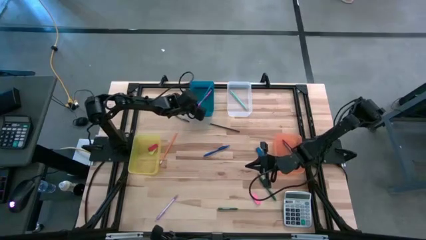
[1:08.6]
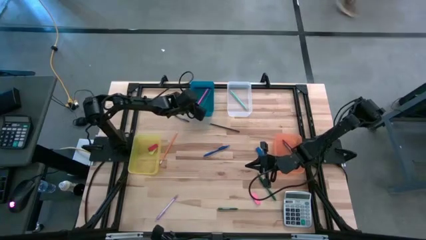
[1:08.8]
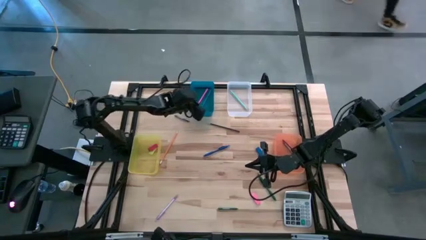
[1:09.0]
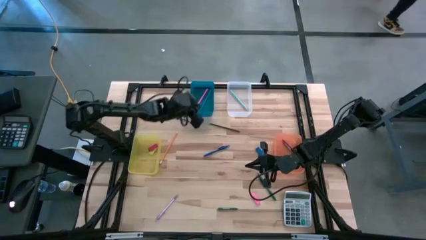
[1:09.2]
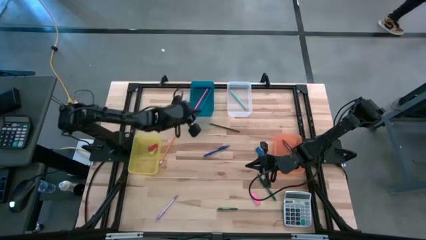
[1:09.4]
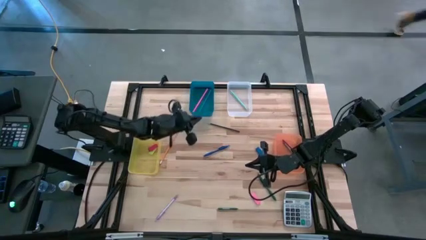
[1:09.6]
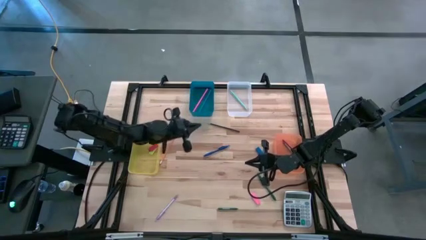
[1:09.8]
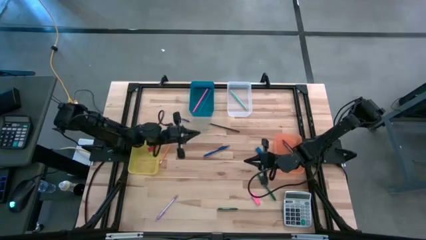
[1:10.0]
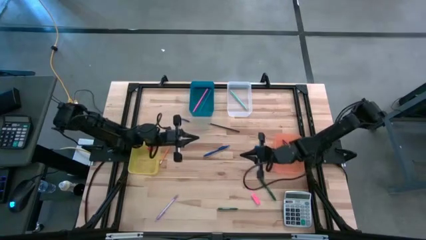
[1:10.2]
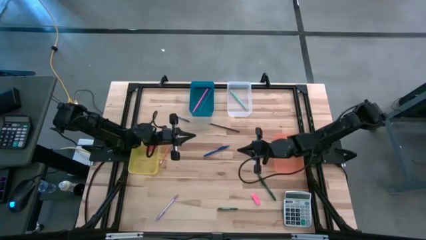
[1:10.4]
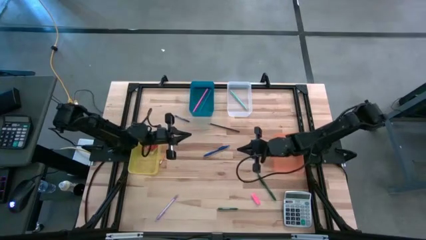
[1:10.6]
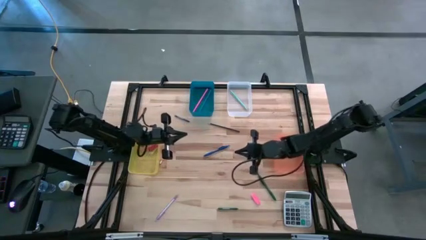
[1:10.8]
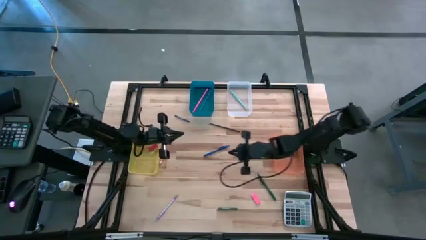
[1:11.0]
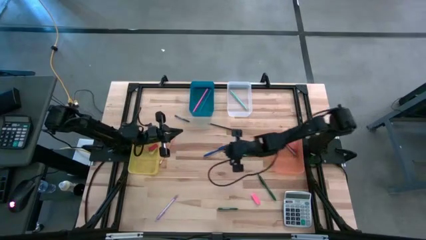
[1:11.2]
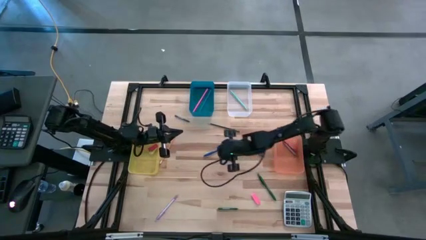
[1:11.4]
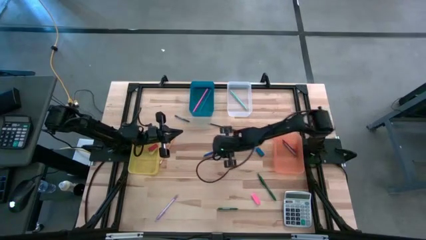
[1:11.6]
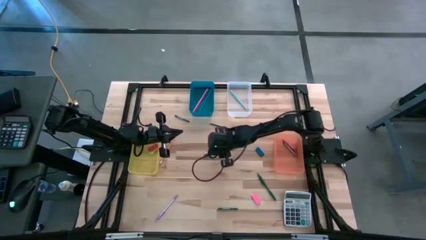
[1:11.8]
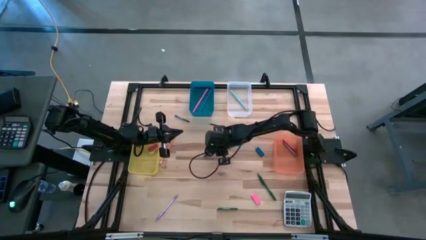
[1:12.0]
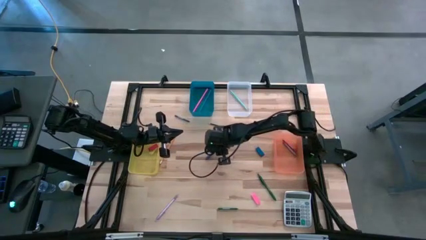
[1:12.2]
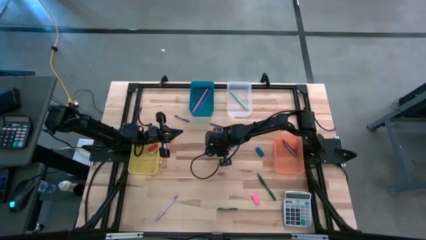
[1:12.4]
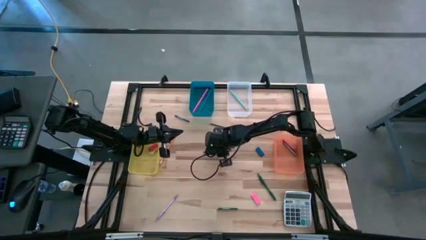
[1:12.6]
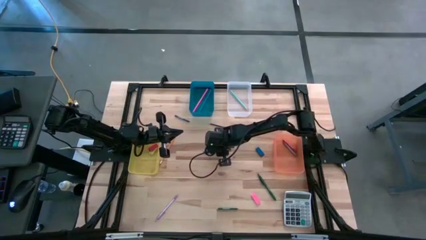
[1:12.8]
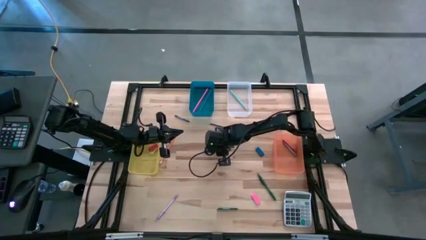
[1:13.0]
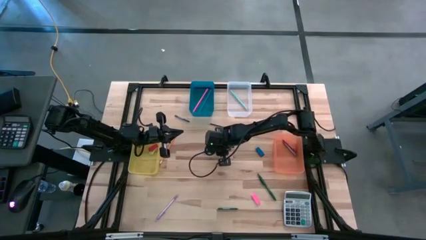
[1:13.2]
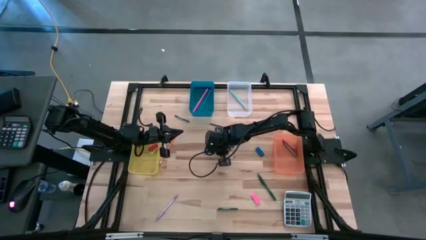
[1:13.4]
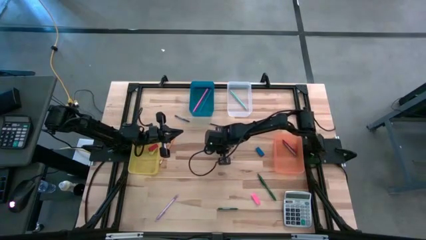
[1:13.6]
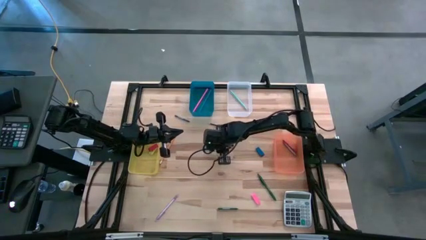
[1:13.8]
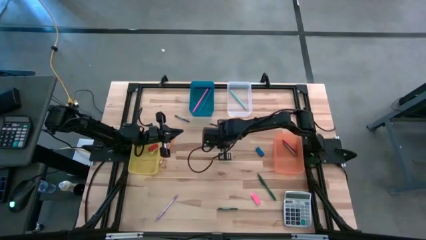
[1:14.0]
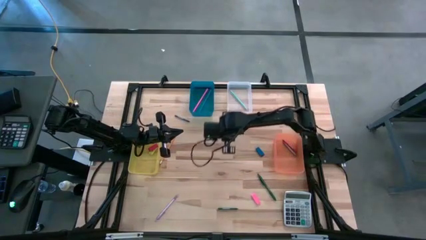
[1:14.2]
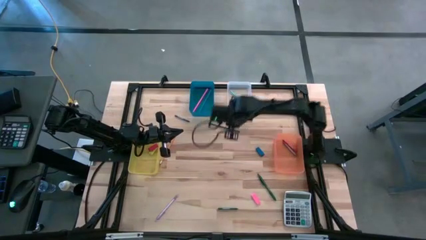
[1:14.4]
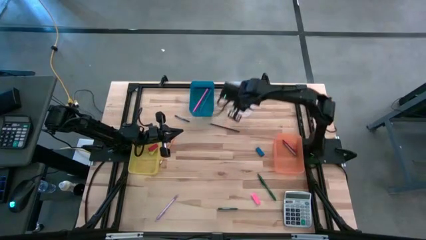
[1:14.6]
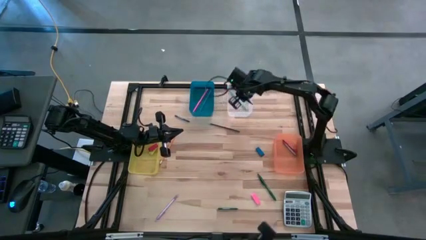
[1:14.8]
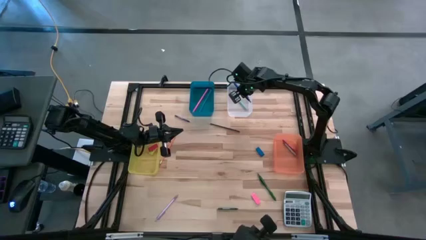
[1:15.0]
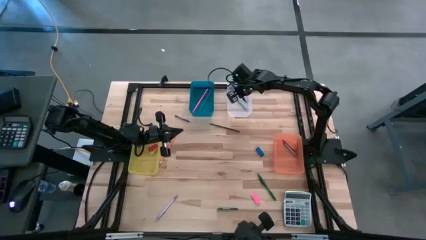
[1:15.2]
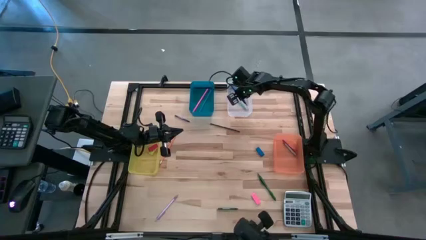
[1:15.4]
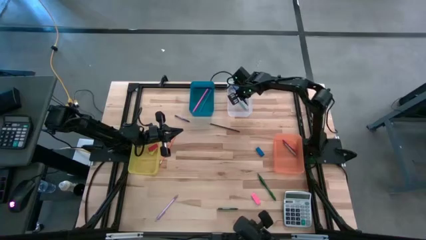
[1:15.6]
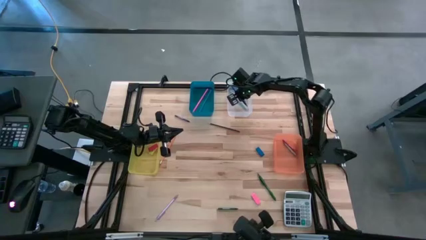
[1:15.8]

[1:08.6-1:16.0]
Task: Sort crayons/erasers/pens/pencils in bins
Put the blue ballpen into the white bin

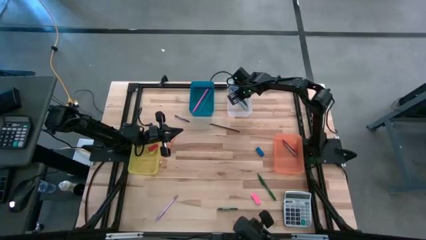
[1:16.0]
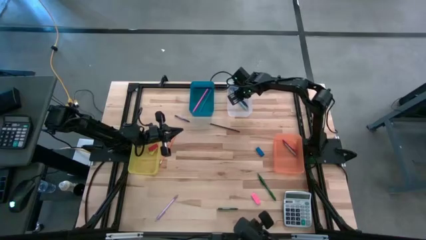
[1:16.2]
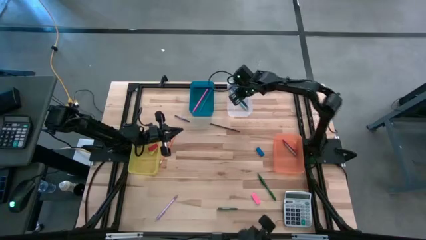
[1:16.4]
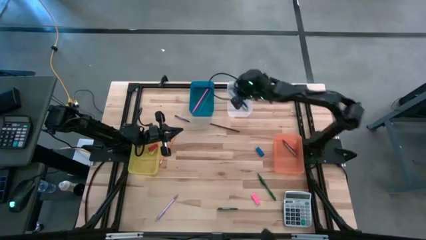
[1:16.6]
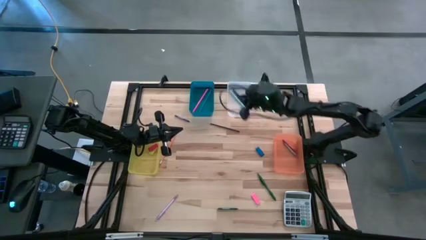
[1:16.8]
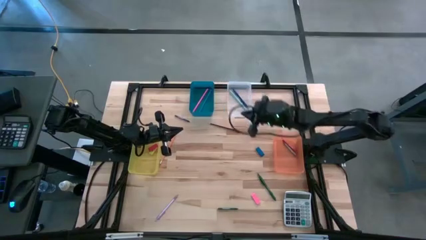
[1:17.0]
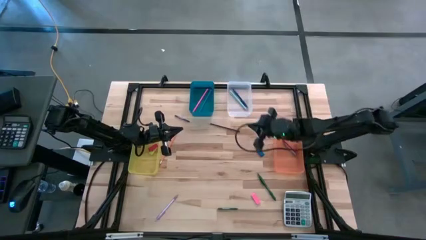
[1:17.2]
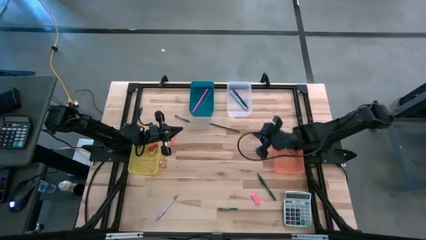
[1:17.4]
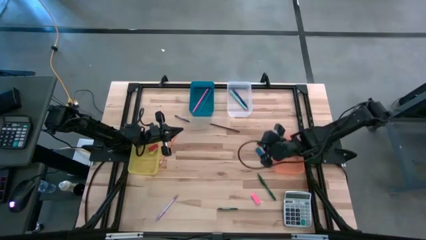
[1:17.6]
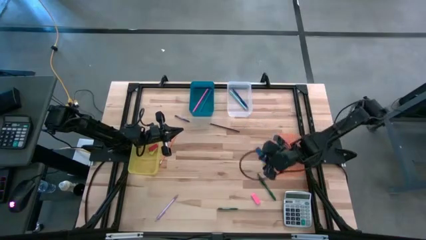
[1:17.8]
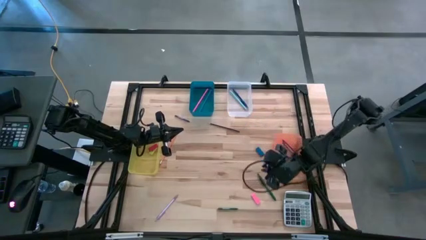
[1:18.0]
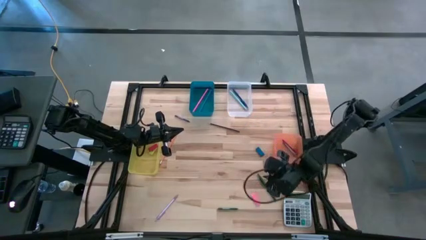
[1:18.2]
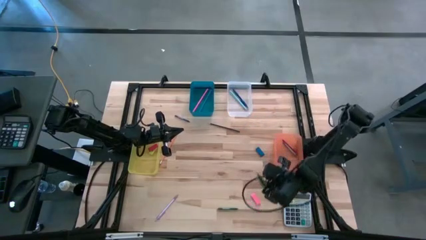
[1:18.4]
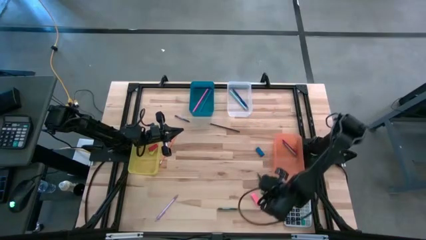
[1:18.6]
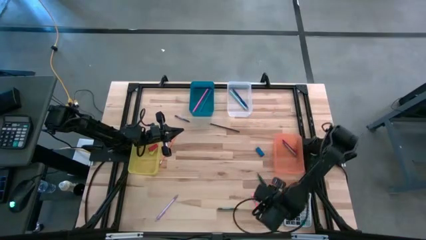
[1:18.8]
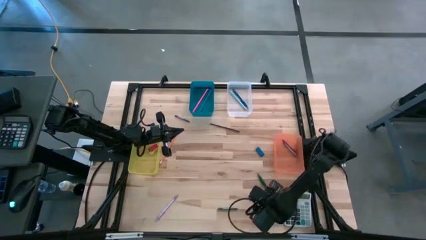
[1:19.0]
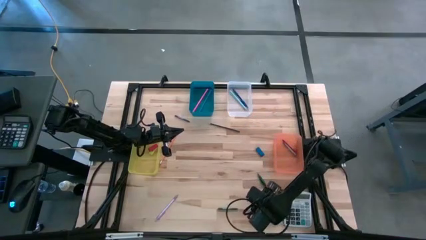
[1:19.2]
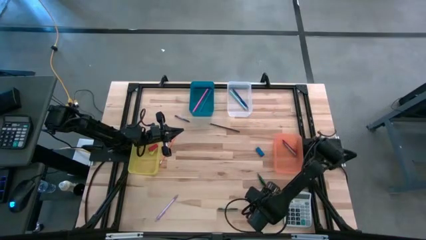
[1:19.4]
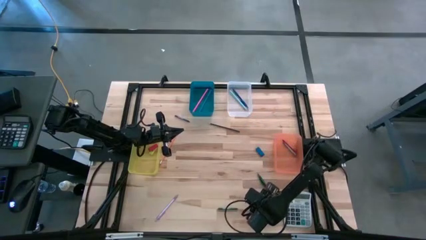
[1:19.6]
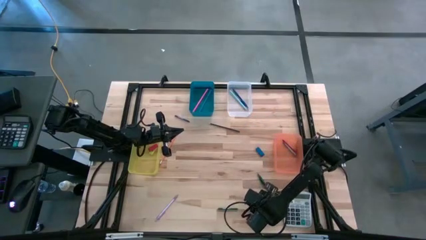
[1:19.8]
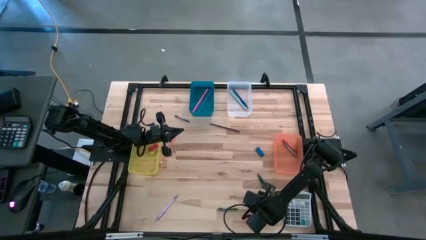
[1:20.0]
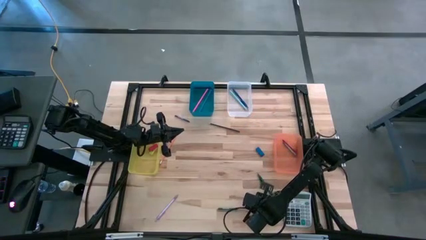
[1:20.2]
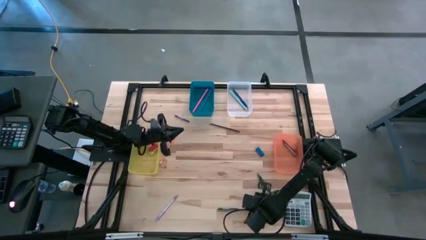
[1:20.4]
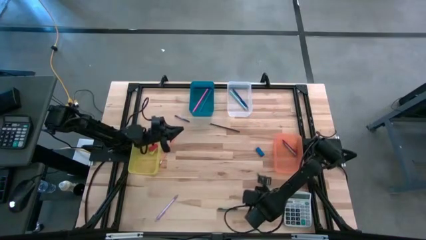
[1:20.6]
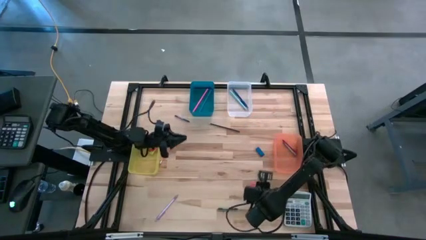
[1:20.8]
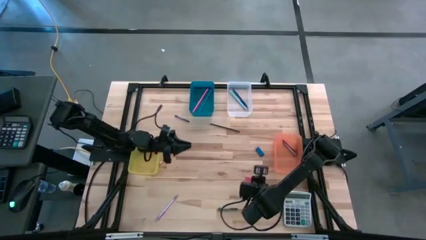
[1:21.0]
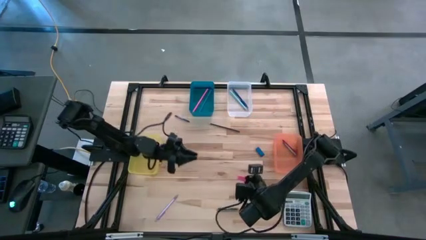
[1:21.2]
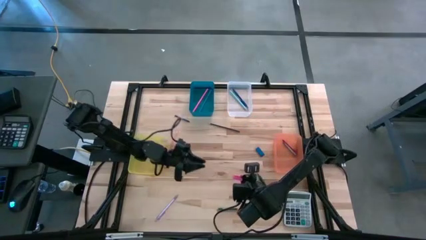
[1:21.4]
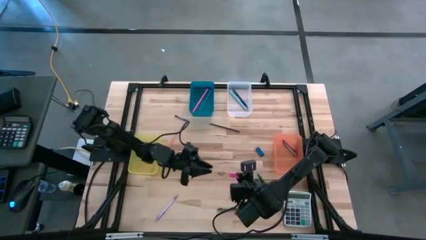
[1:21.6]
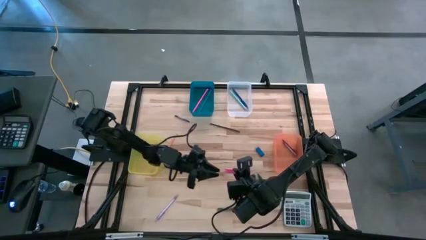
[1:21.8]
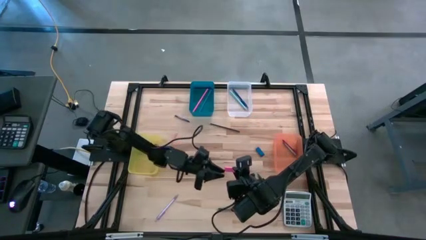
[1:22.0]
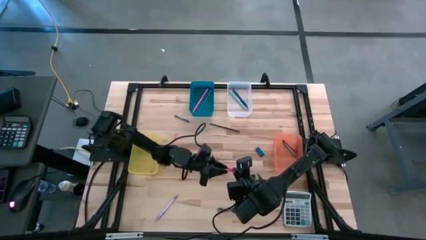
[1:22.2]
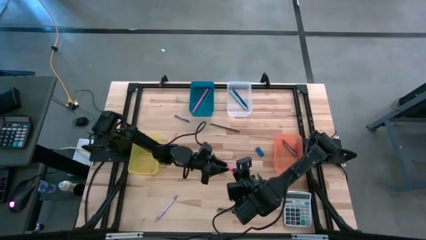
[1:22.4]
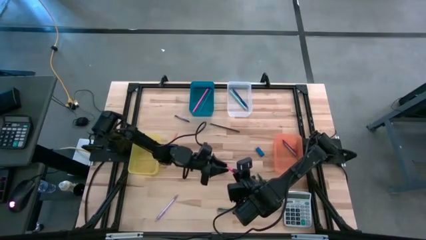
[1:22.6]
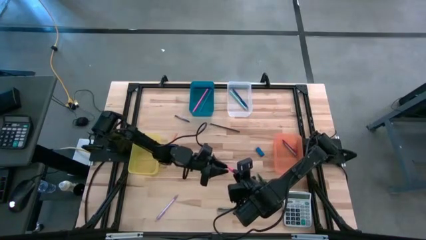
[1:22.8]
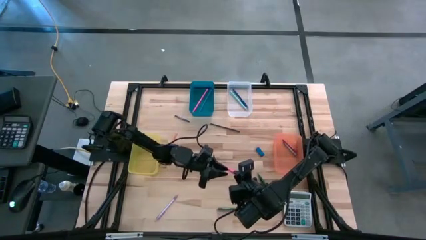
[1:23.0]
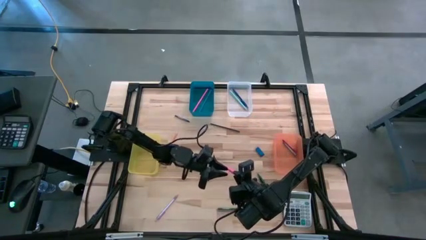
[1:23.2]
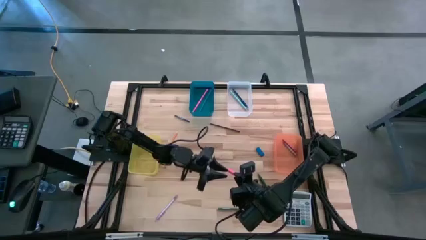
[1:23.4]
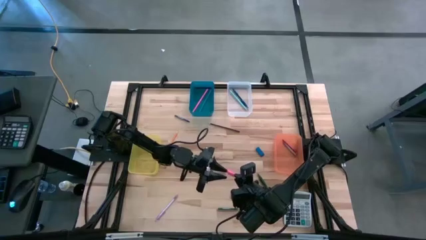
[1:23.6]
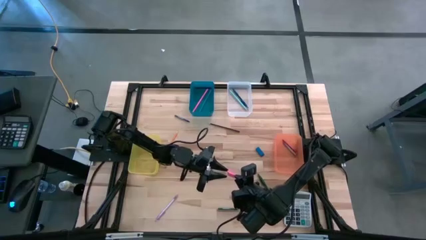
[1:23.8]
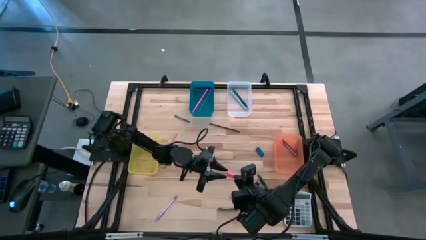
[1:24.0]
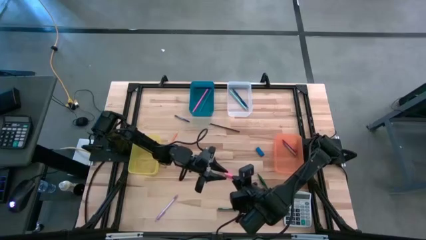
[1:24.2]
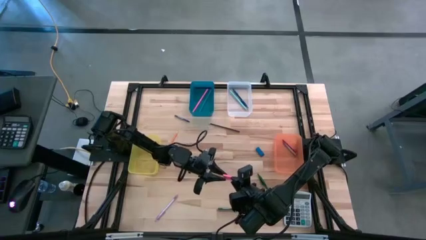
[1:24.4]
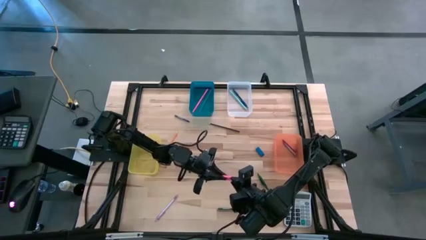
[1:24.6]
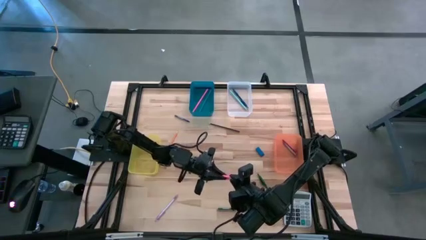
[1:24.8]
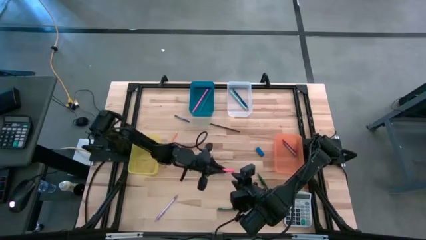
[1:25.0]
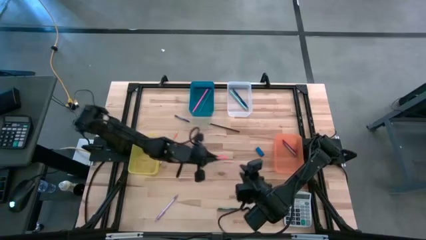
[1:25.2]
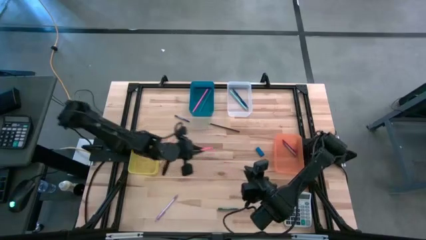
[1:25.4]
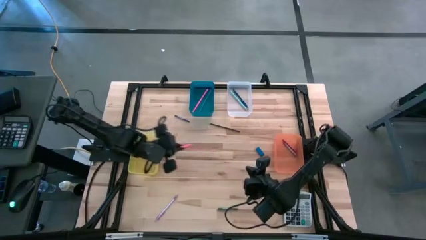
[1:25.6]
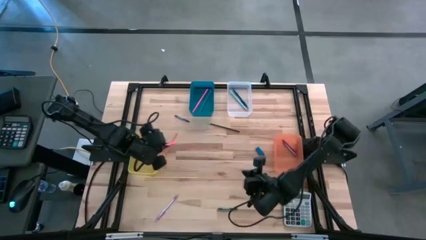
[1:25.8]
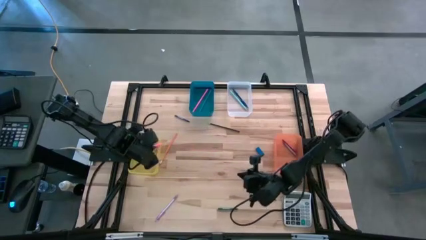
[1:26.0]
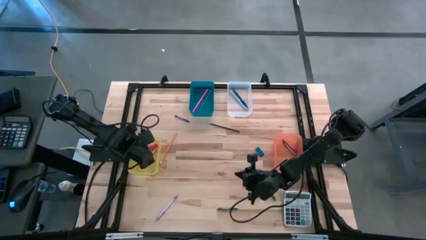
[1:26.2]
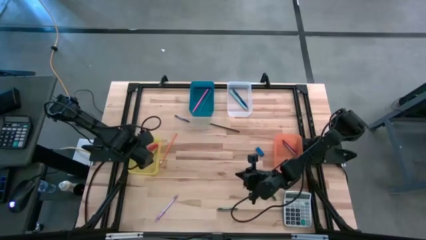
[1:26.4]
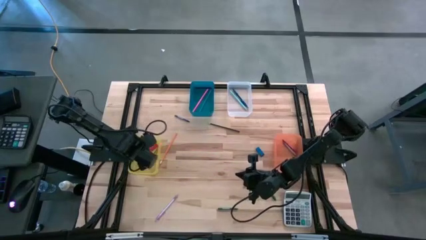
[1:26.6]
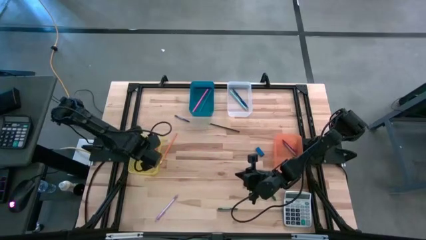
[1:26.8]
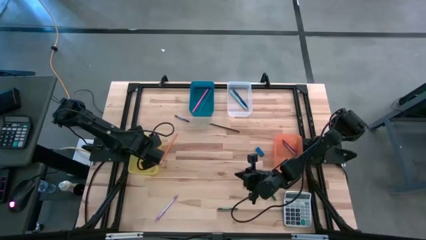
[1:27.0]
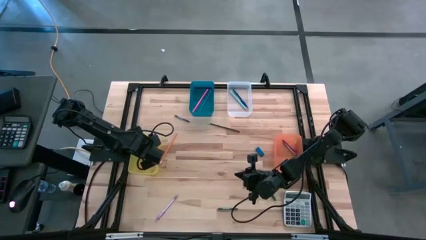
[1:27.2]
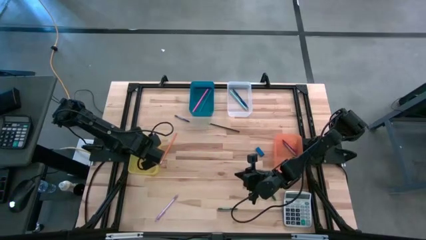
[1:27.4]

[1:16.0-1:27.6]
Put the pink eraser into the yellow bin
